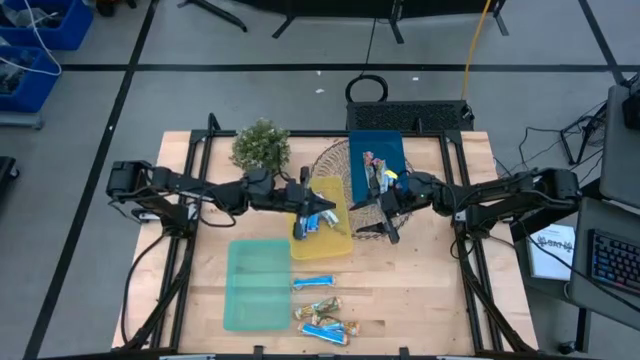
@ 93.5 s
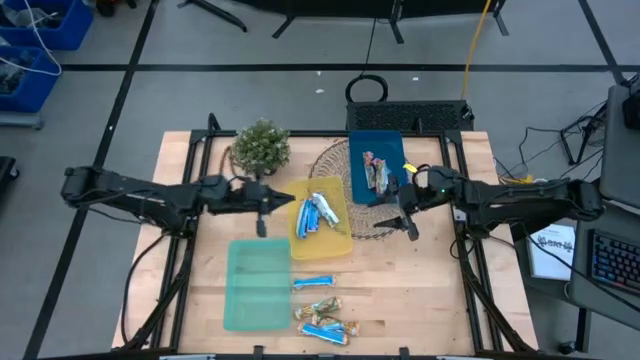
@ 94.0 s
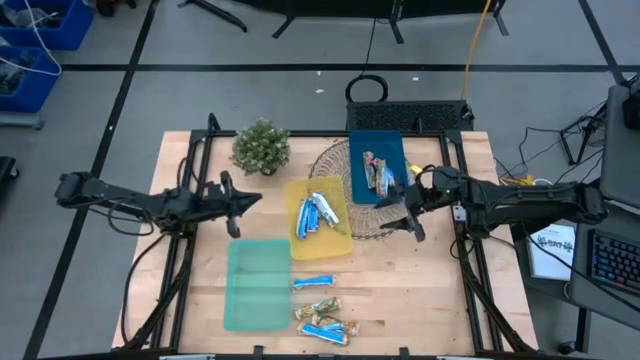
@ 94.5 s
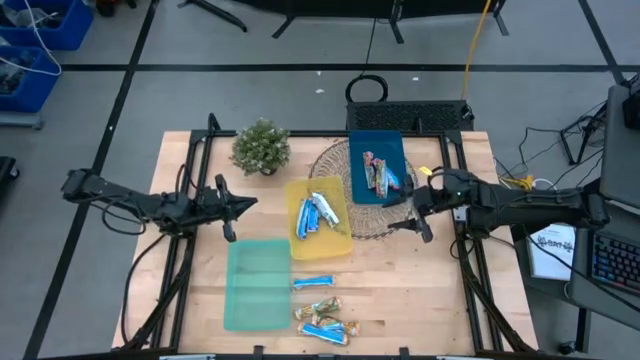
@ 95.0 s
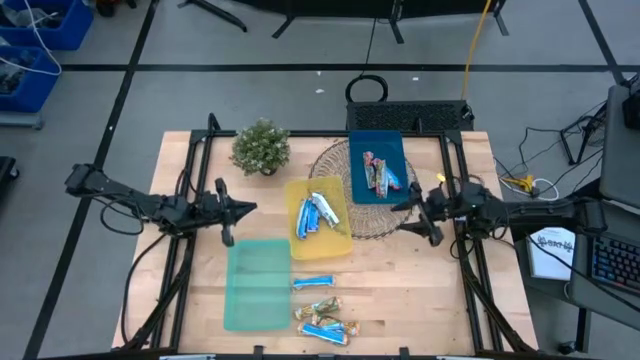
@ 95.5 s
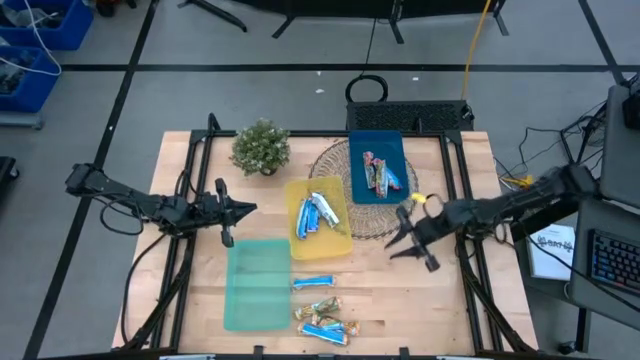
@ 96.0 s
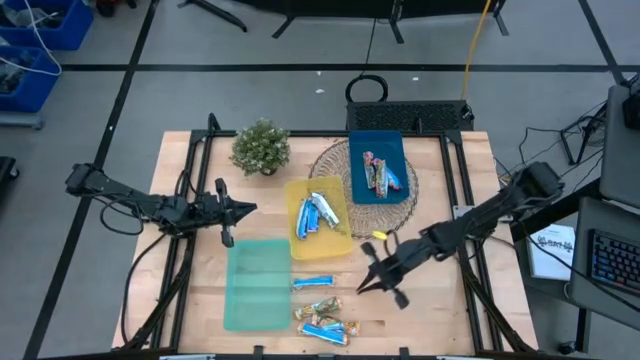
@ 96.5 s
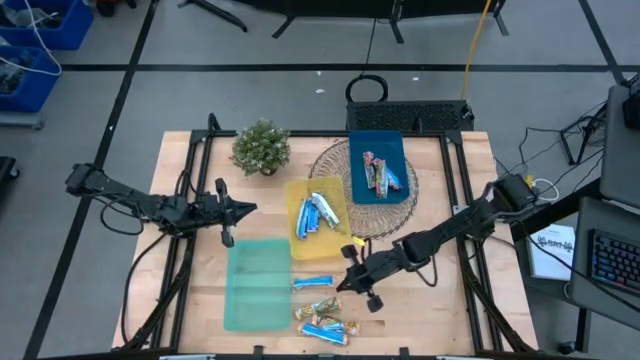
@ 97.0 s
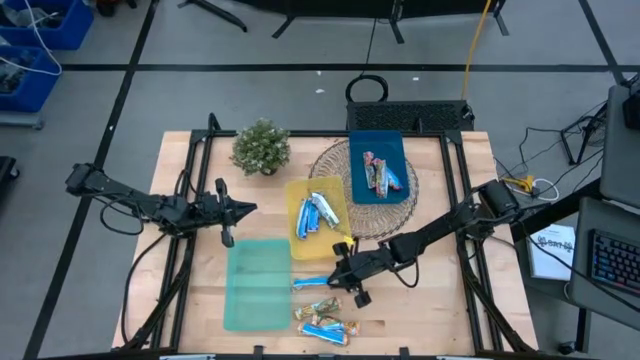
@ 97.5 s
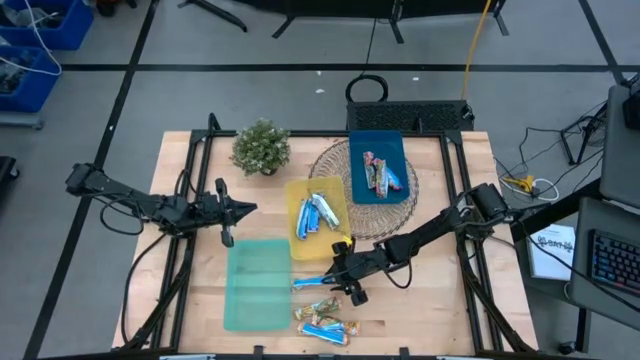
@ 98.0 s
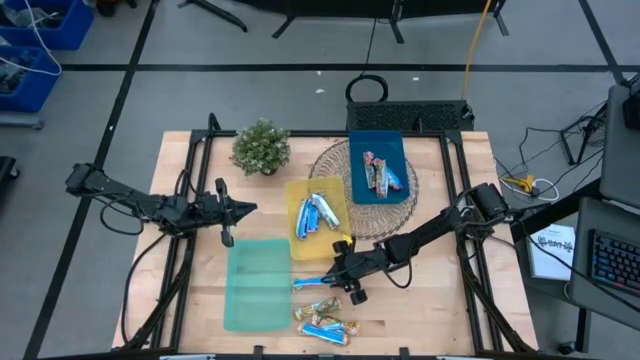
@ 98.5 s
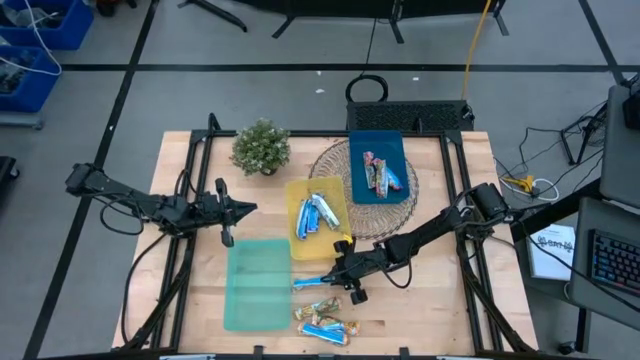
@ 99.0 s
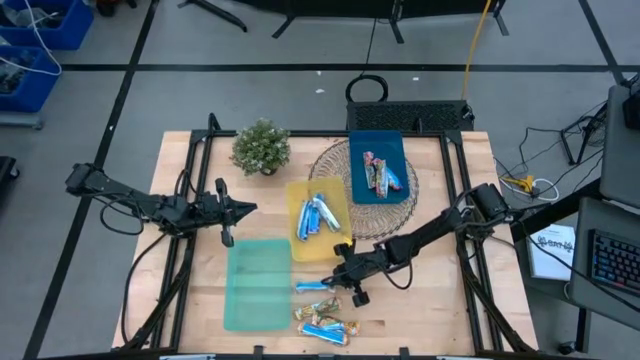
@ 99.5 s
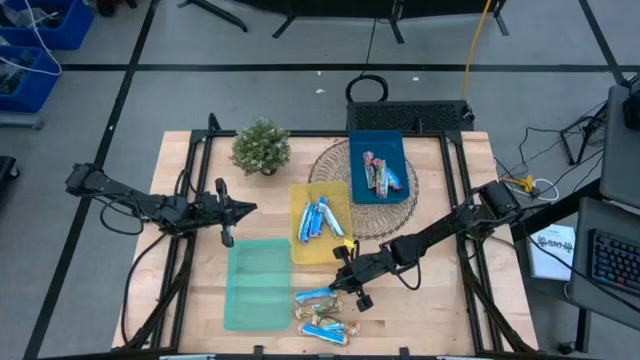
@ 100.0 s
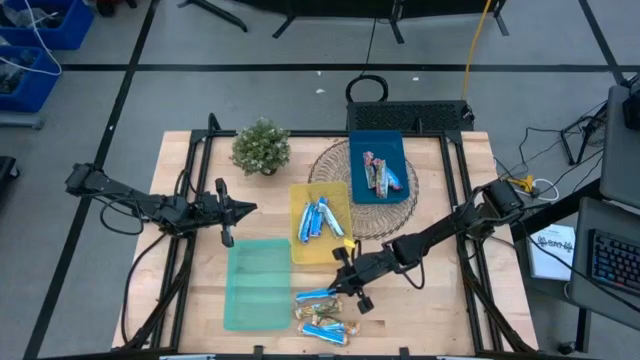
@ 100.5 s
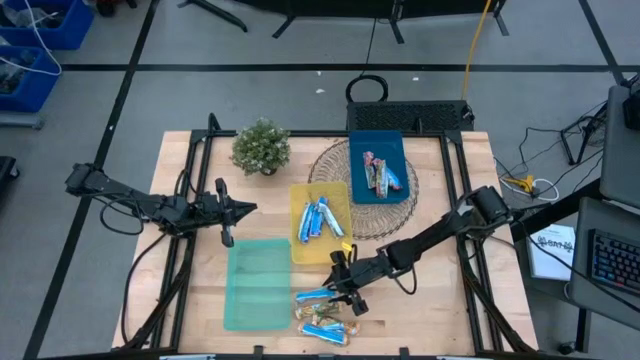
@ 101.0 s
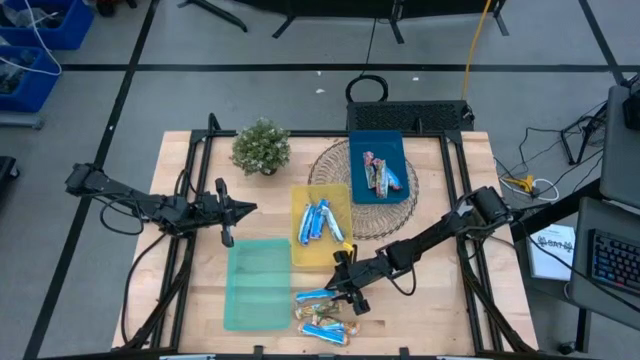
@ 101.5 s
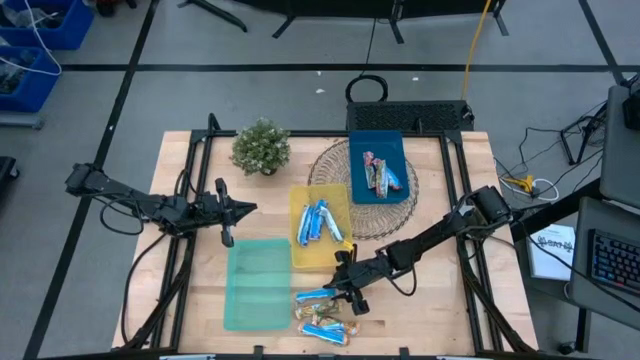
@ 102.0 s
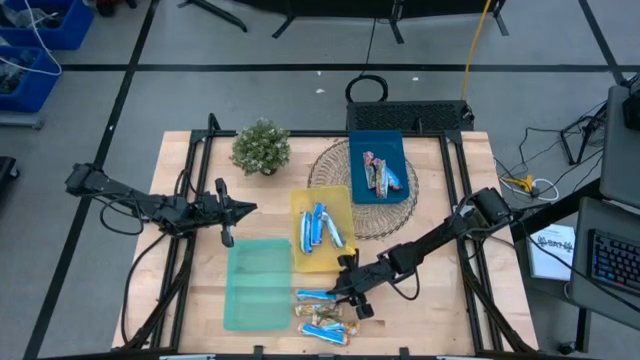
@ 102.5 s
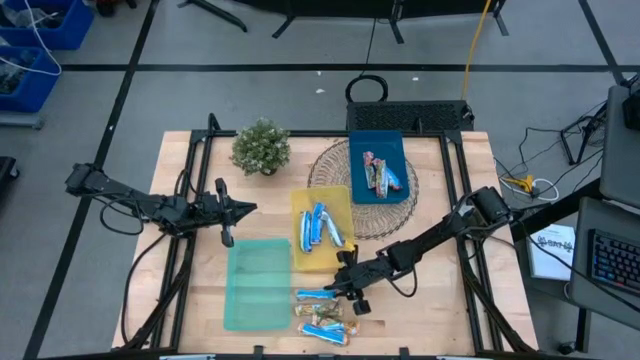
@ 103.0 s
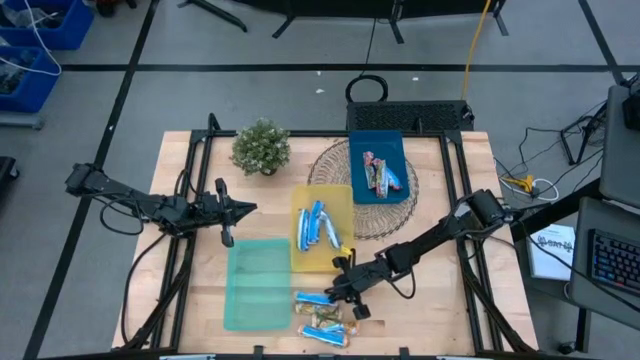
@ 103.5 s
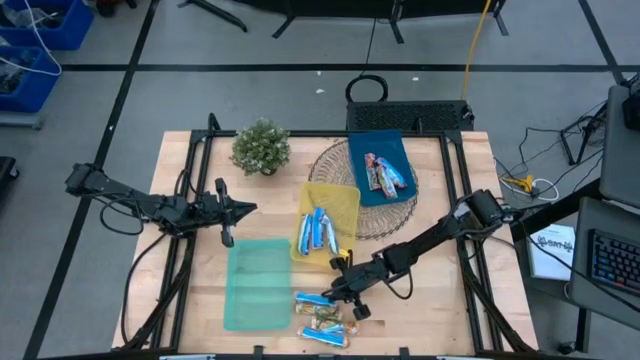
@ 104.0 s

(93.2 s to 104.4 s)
Task: Pick and place Granola Bars by type
Put the yellow granola bar into the green bin

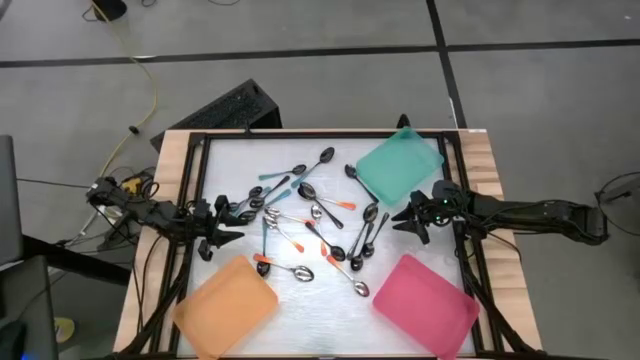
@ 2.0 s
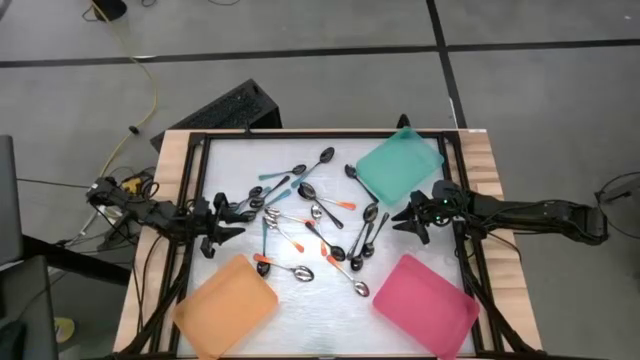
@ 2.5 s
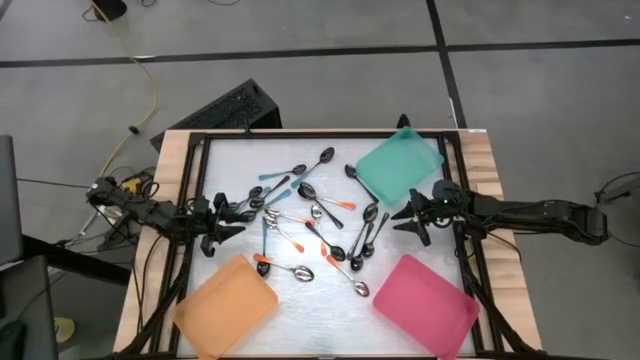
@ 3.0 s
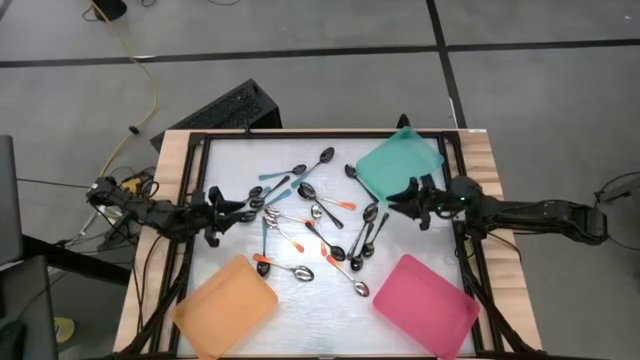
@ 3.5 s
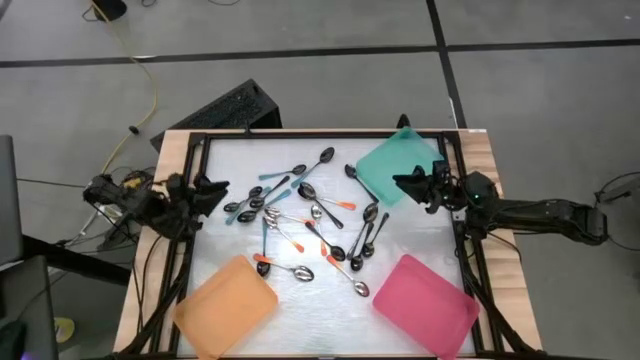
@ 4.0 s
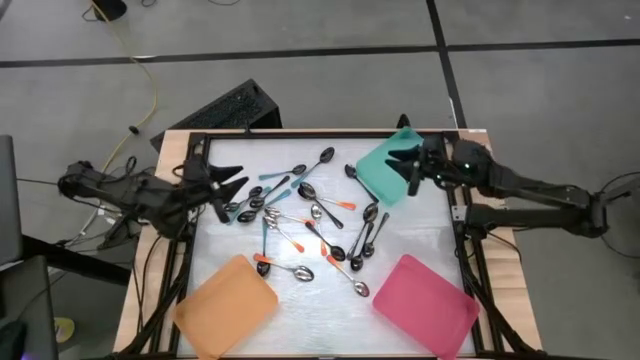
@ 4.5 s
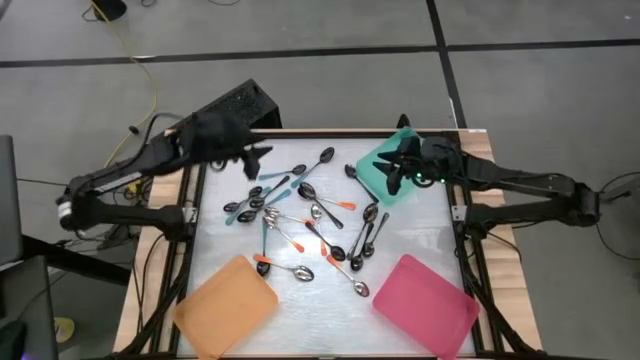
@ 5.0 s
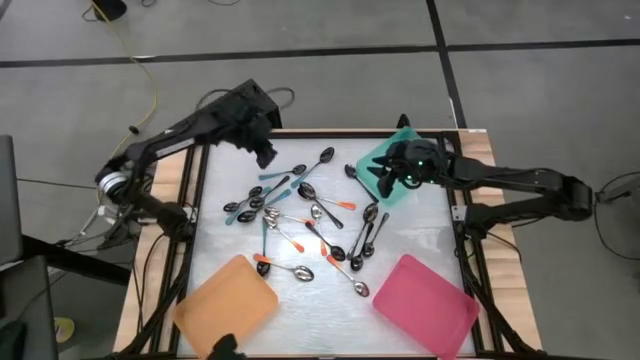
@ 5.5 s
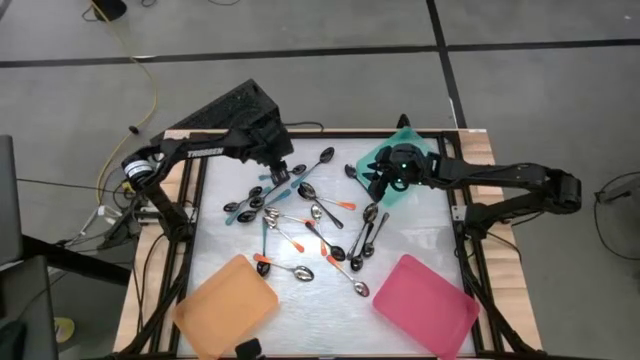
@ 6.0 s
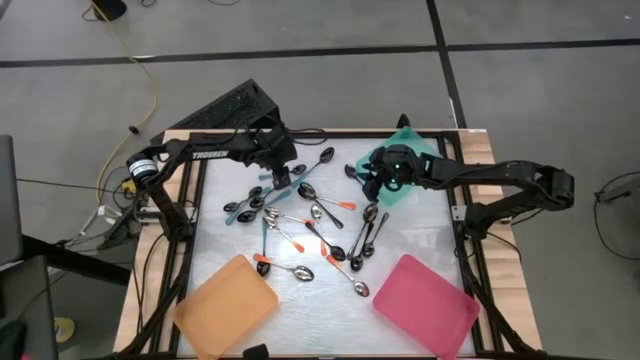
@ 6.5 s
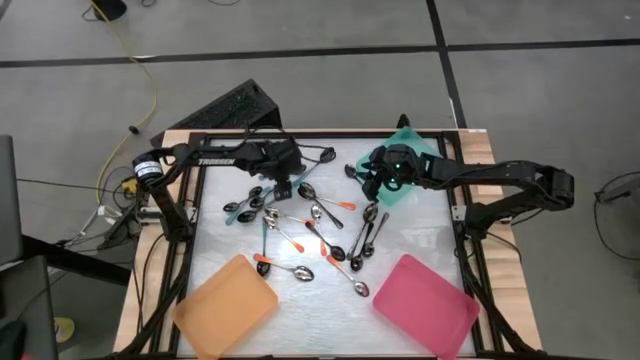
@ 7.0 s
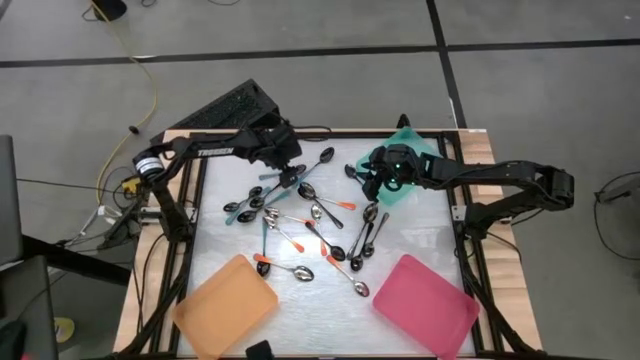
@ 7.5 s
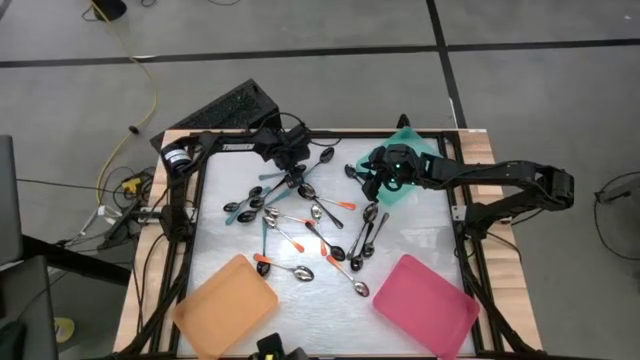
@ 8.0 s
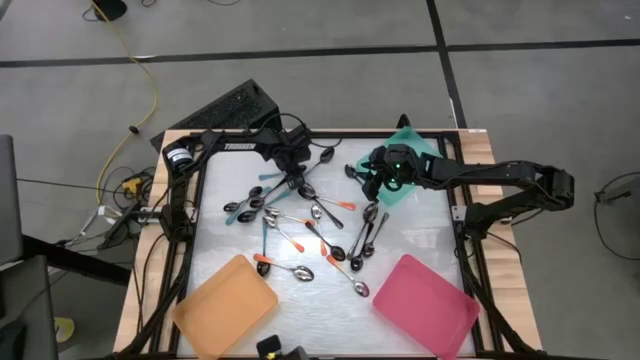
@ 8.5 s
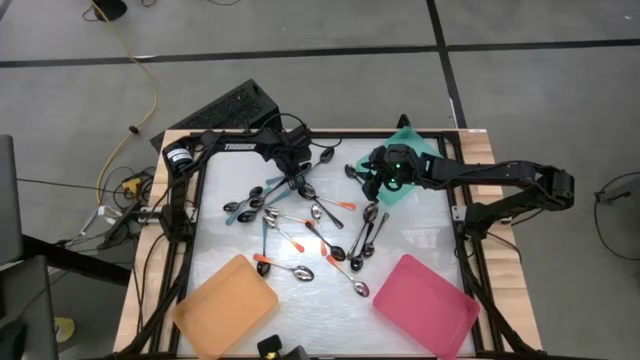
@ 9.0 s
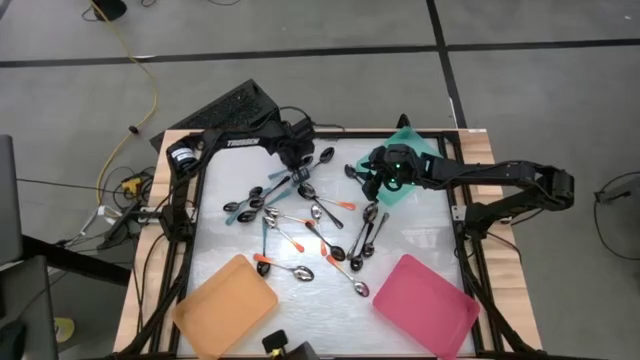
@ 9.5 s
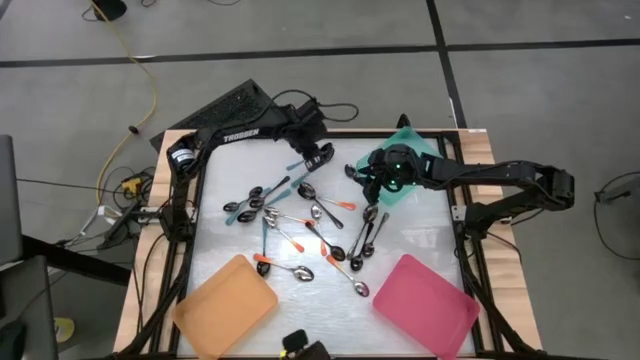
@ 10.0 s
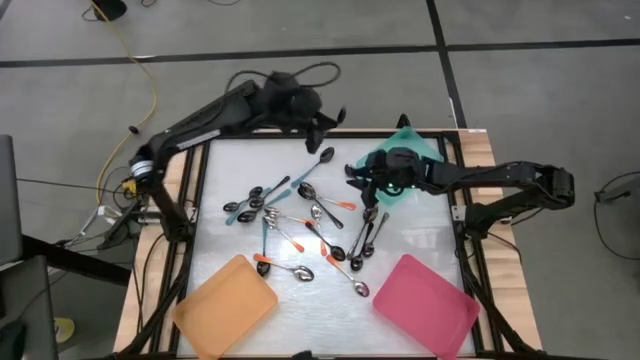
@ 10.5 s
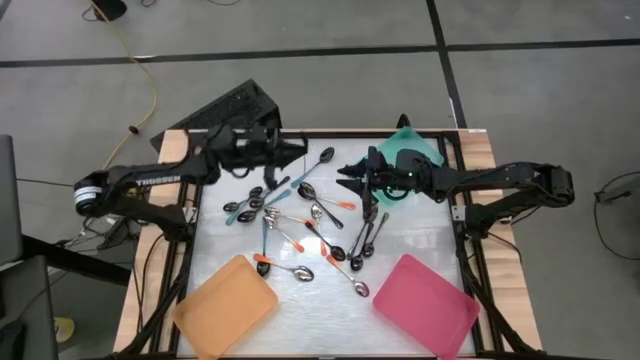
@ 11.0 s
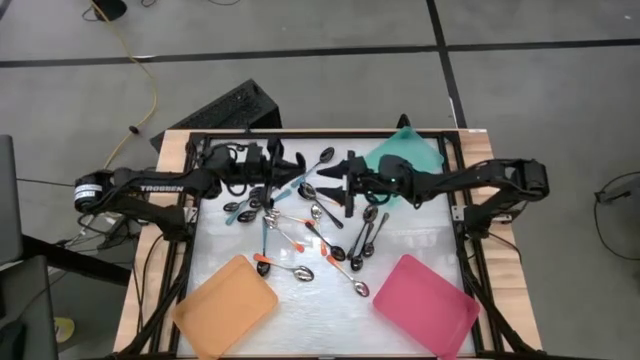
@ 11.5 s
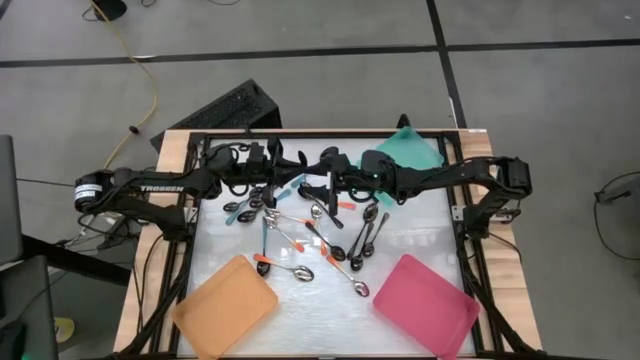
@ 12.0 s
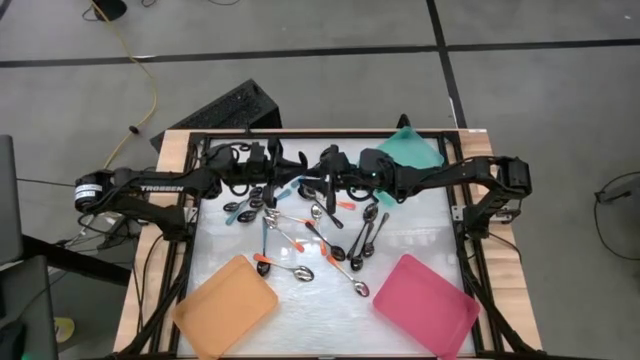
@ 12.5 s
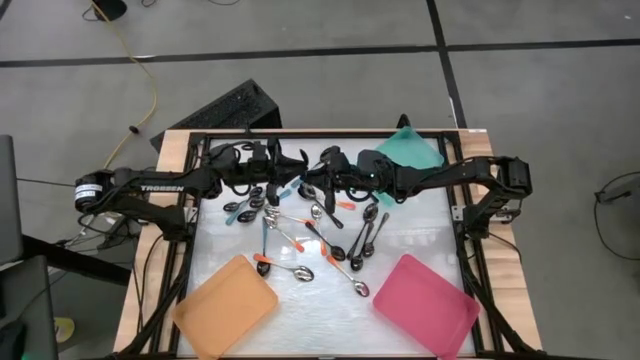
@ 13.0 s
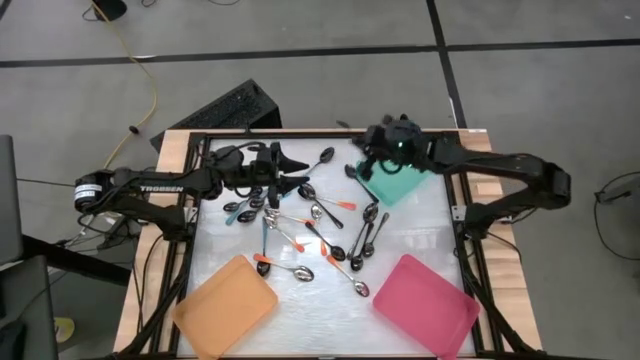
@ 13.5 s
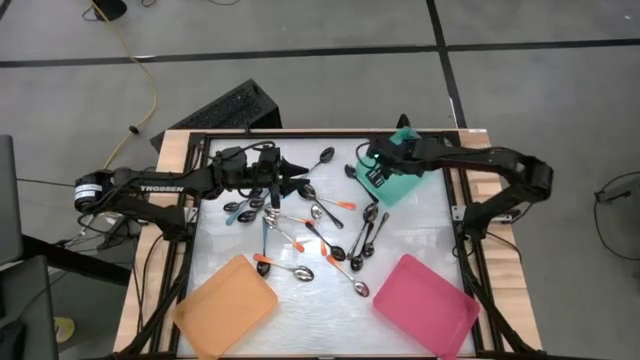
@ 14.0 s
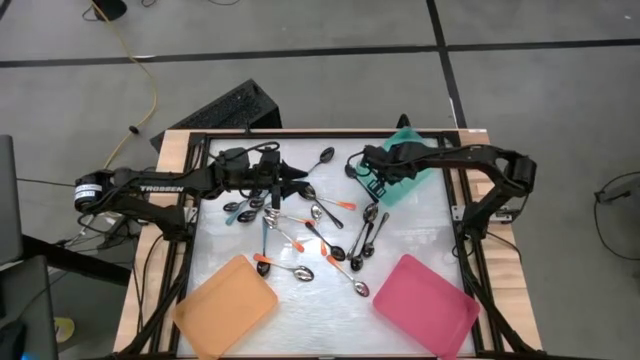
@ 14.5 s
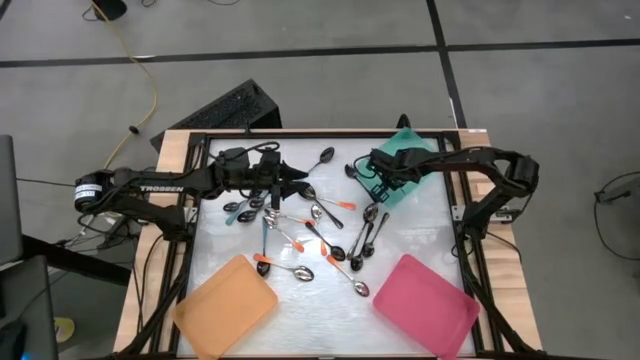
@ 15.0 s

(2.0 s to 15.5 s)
Task: Sort silverware by color (type)
Put the blue spoon into the blue bin
